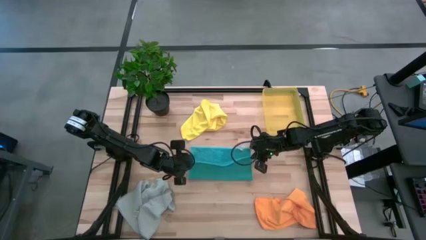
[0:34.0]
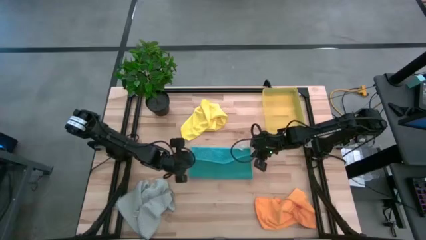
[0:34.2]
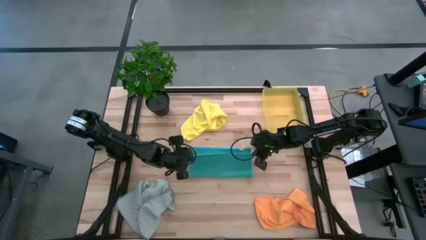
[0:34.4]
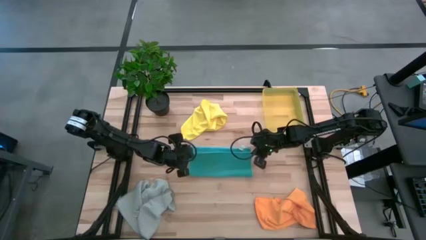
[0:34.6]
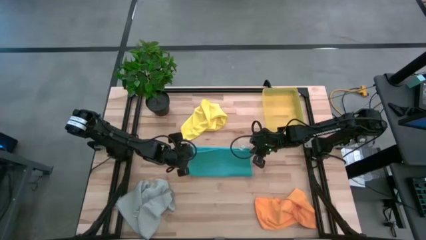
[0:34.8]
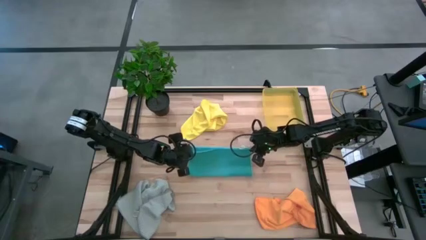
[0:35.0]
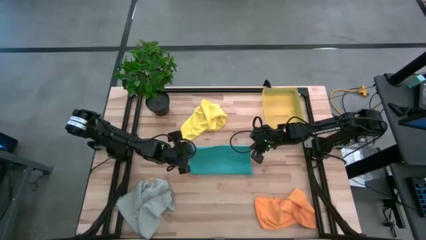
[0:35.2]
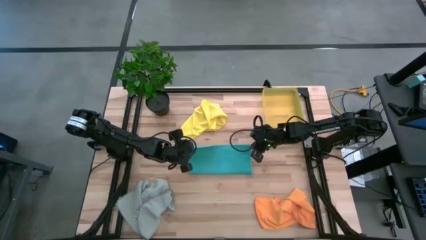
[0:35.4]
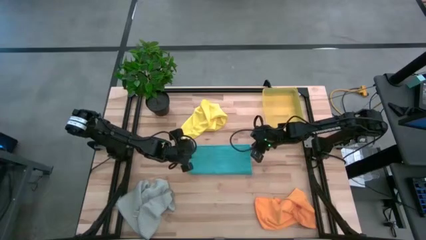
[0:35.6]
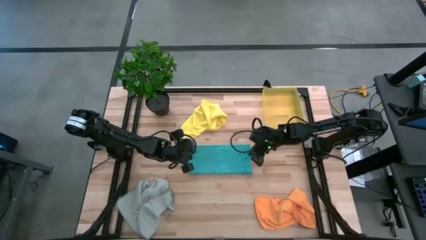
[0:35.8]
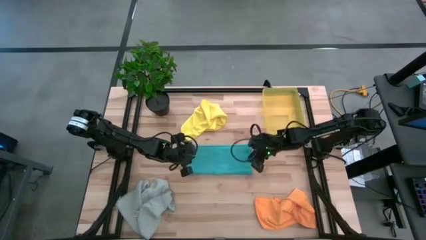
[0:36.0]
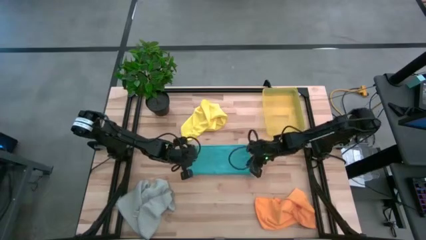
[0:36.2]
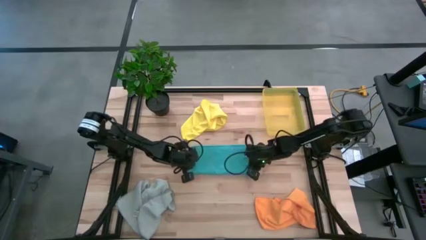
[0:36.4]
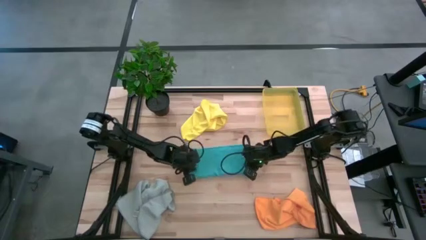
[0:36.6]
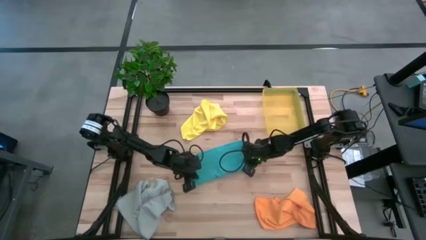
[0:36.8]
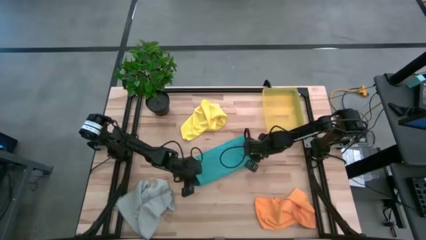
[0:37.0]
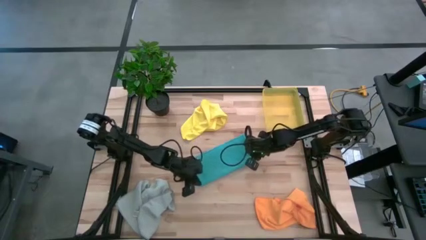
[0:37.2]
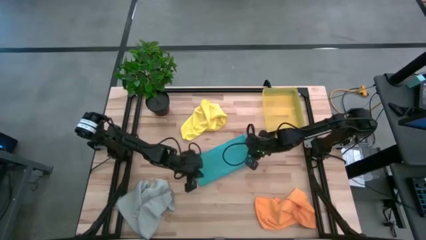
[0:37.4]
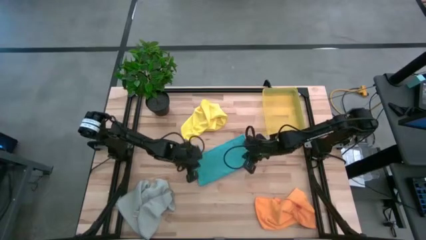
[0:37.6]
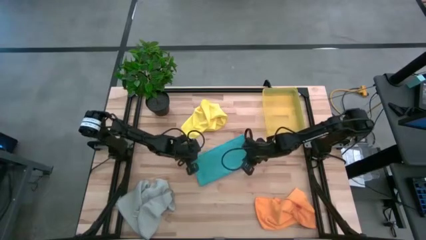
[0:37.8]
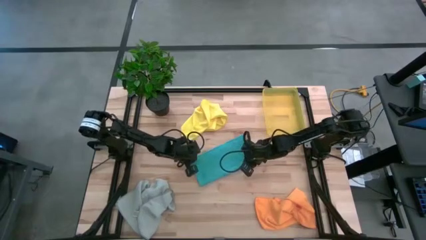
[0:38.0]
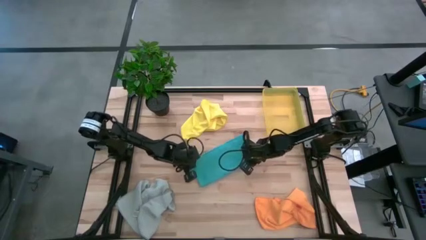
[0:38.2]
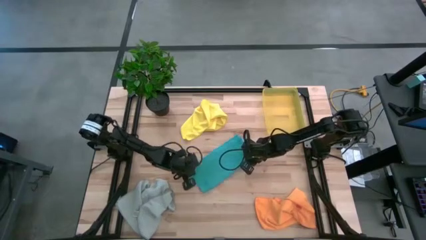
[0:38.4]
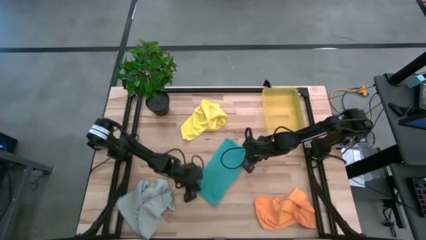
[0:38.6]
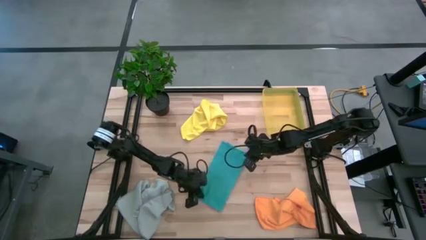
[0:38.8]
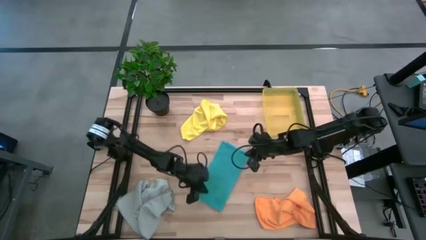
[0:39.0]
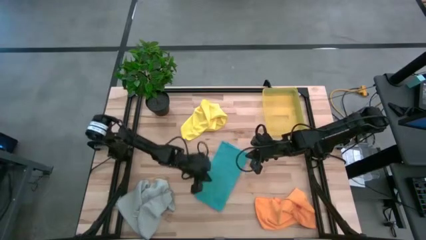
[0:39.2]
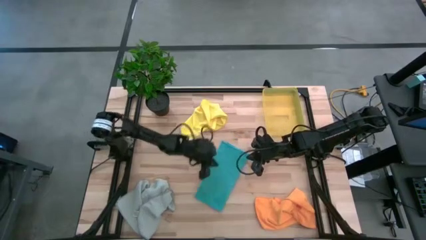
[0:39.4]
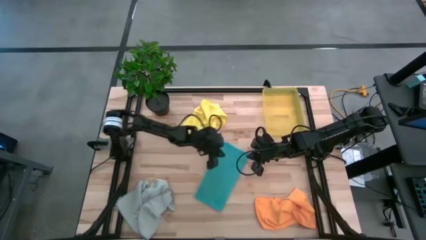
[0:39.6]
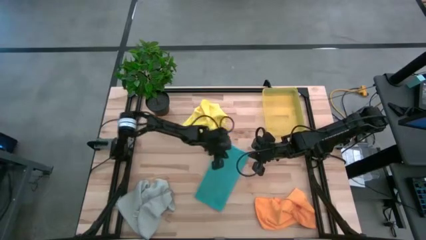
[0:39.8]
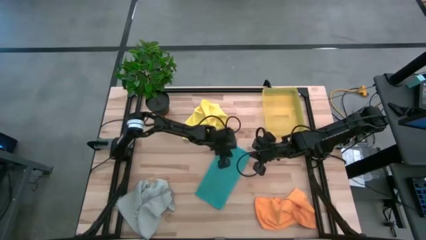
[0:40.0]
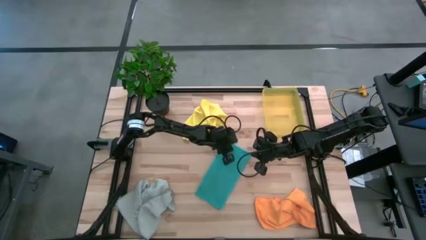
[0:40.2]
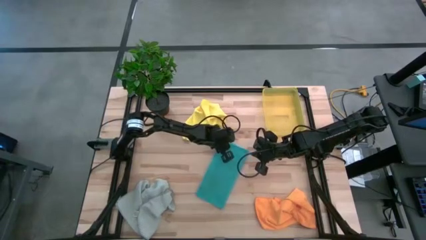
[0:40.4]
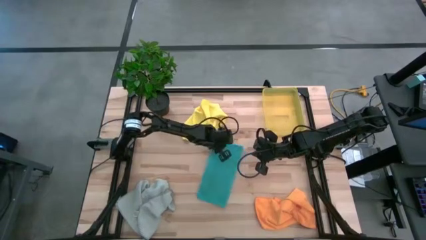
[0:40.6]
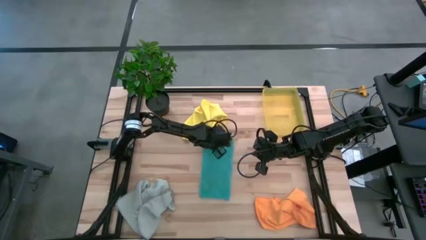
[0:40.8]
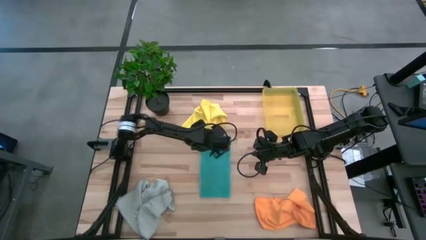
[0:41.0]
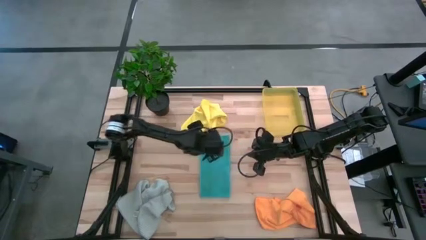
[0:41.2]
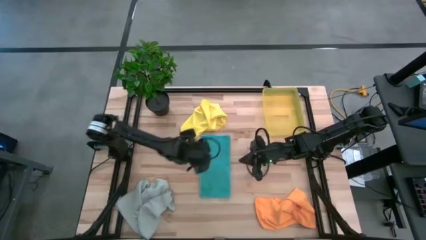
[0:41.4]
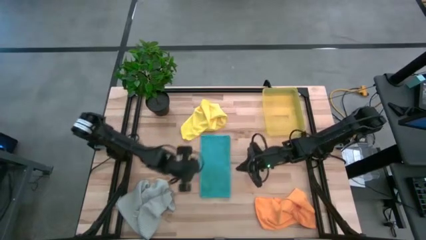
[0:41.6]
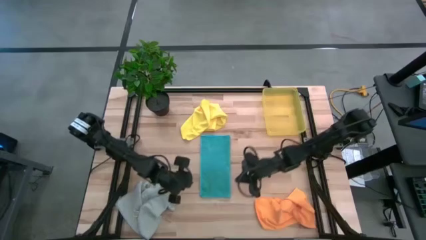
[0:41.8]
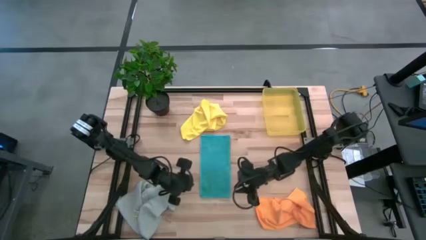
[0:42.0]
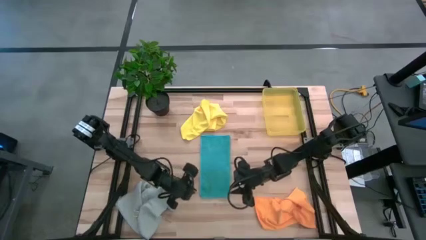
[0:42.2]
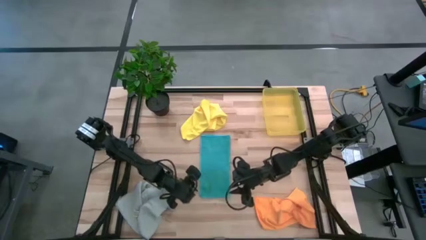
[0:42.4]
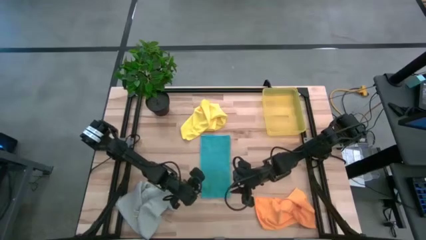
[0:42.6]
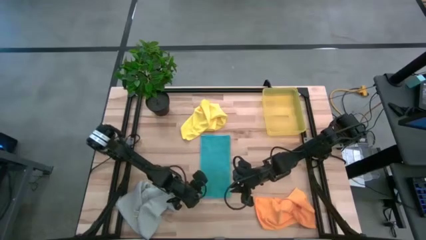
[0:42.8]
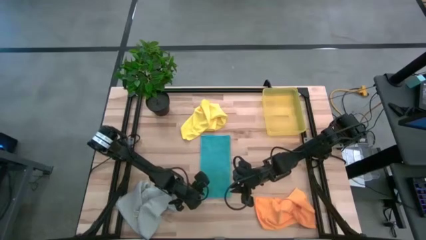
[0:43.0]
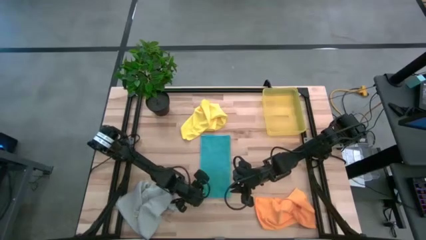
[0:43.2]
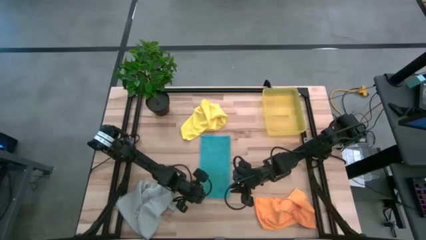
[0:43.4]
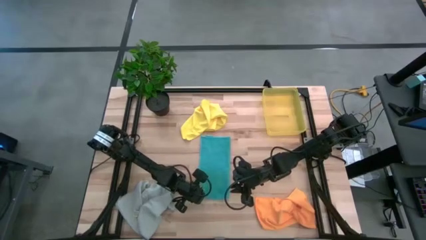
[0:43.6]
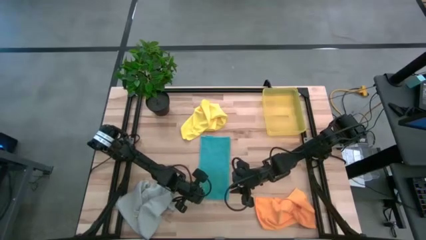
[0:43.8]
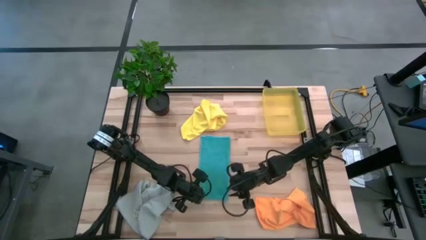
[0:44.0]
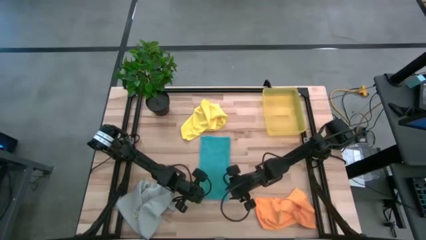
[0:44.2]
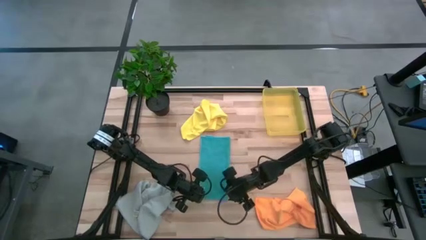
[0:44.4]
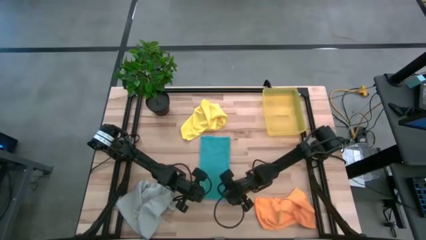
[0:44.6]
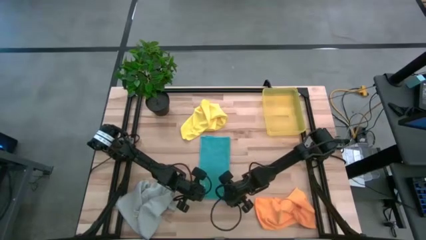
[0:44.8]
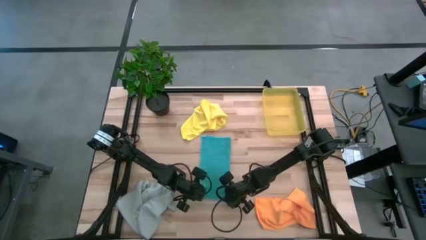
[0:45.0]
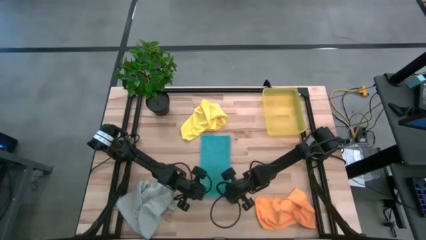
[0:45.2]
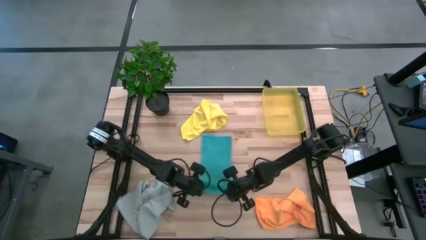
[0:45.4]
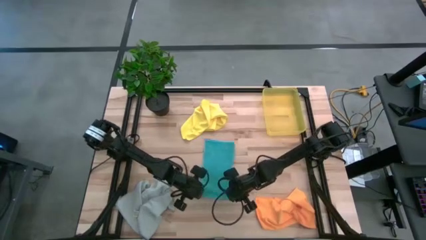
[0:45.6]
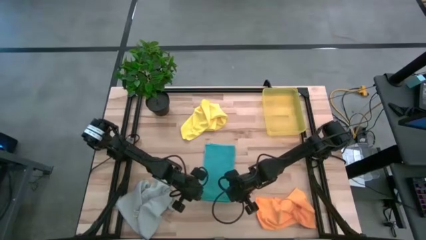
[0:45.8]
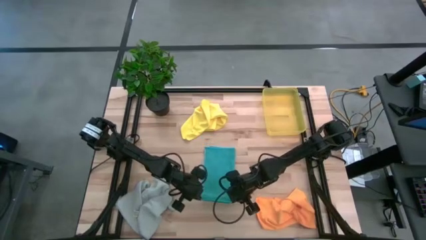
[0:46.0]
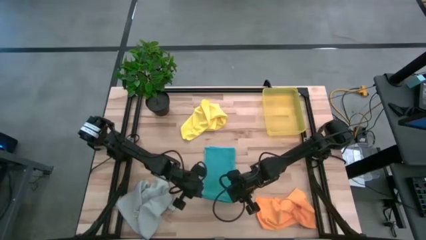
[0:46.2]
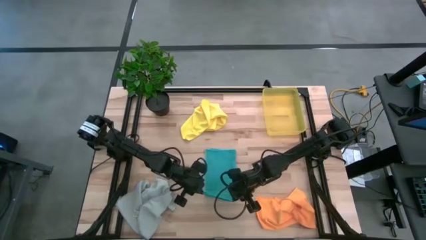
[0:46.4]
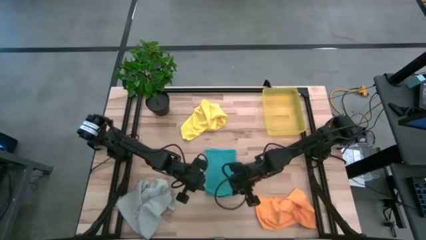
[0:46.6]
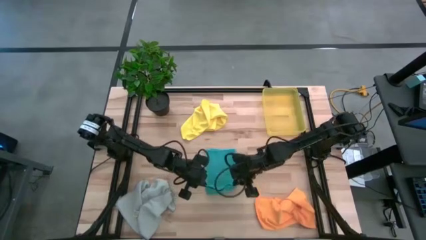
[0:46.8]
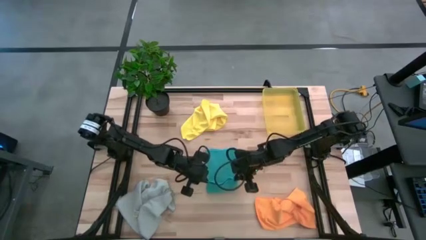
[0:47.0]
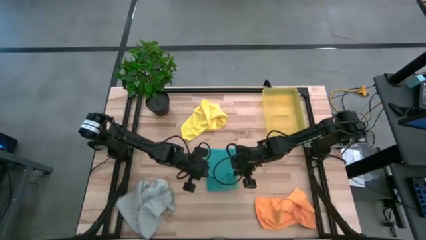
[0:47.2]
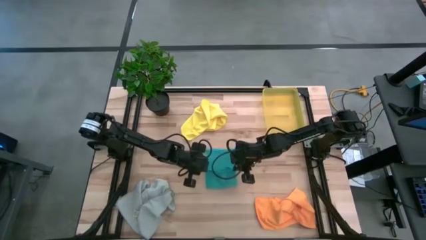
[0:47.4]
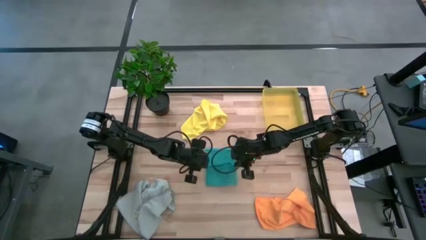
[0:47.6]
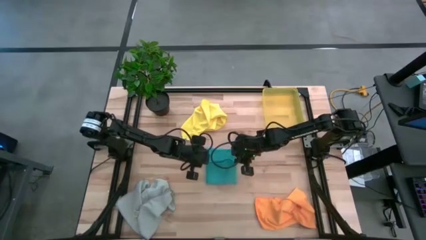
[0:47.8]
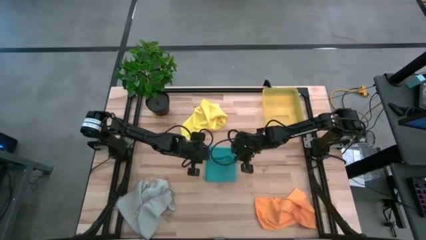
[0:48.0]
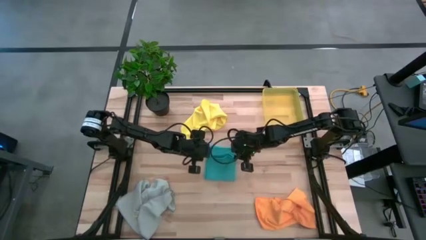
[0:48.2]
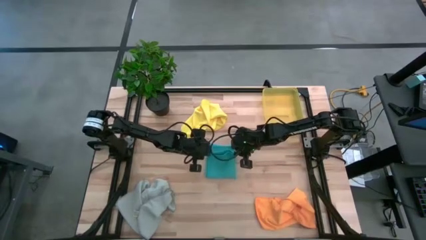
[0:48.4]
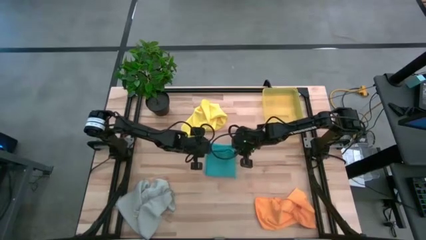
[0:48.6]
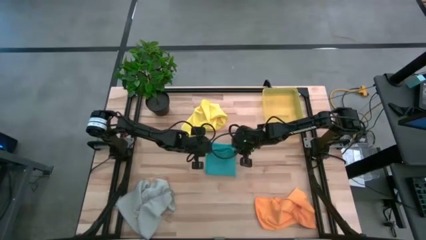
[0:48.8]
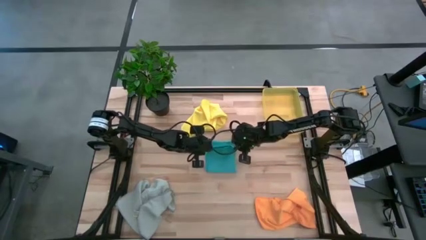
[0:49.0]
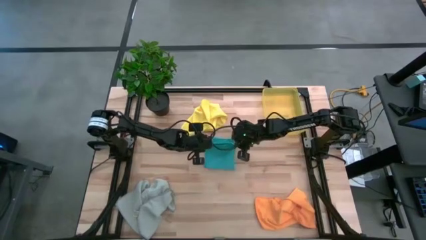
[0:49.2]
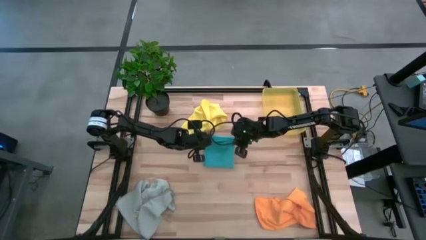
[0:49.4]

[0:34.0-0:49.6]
Task: Fold microfiber towels
Fold the blue microfiber towel
